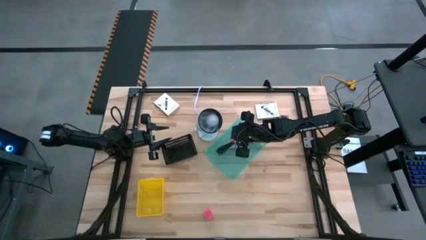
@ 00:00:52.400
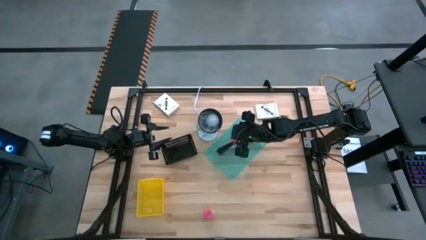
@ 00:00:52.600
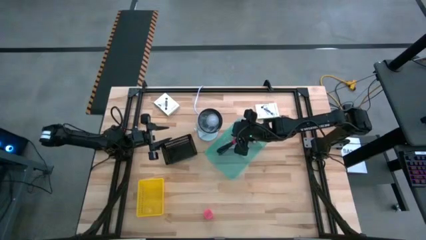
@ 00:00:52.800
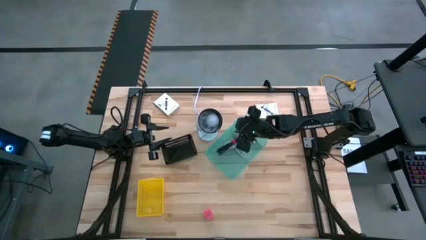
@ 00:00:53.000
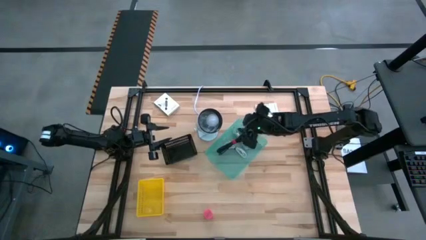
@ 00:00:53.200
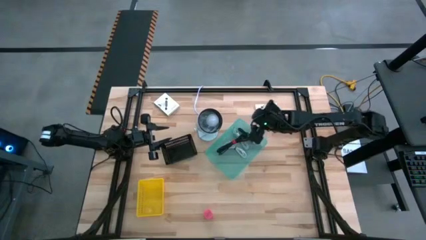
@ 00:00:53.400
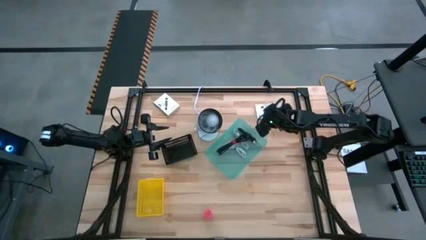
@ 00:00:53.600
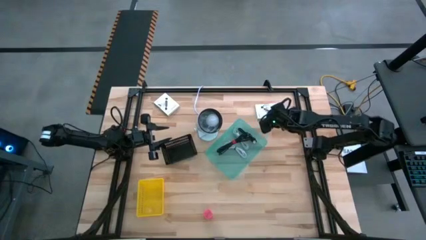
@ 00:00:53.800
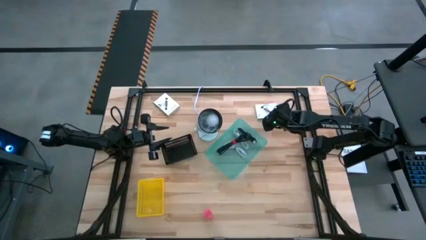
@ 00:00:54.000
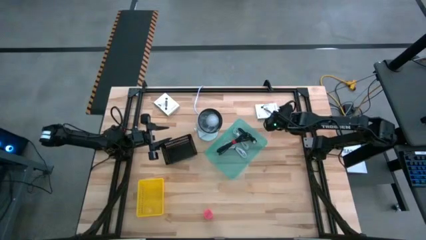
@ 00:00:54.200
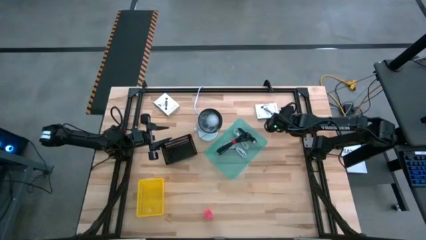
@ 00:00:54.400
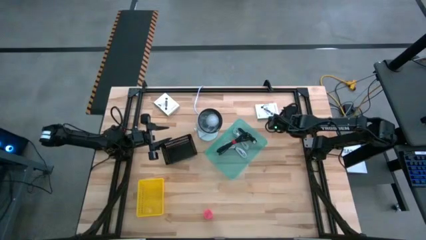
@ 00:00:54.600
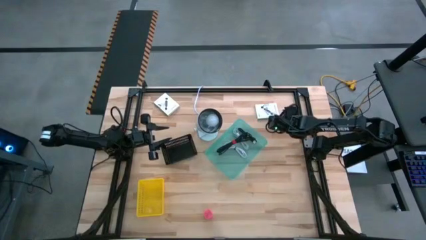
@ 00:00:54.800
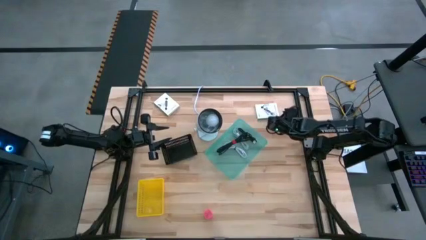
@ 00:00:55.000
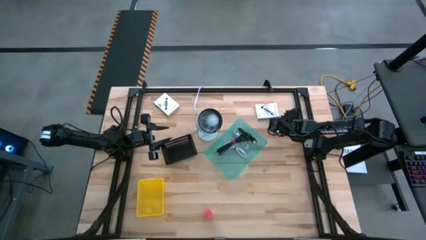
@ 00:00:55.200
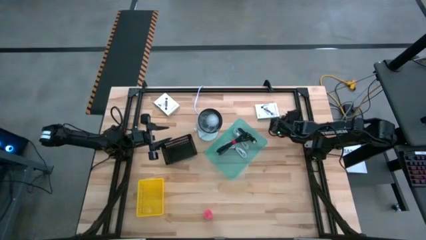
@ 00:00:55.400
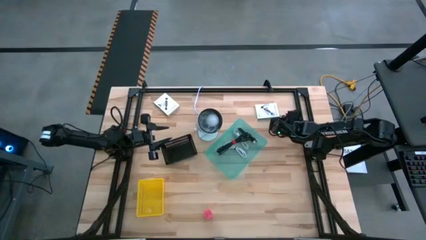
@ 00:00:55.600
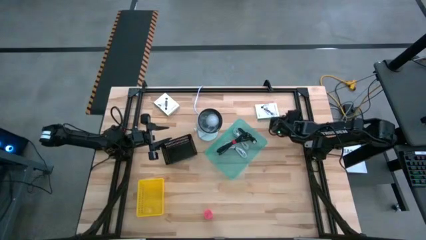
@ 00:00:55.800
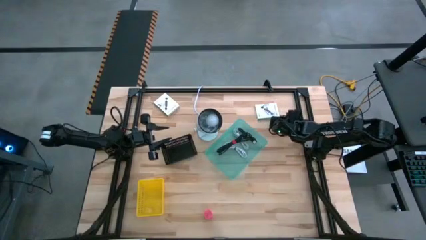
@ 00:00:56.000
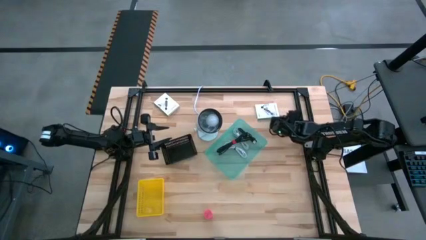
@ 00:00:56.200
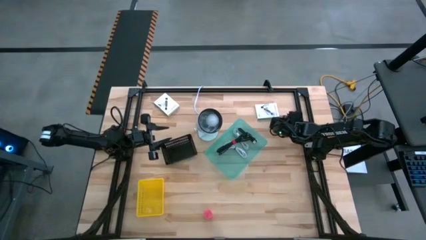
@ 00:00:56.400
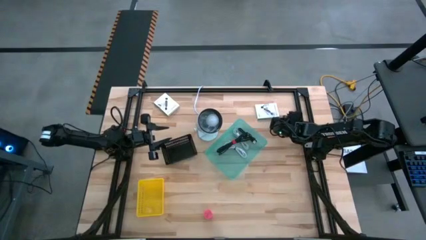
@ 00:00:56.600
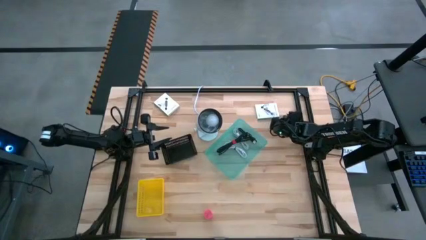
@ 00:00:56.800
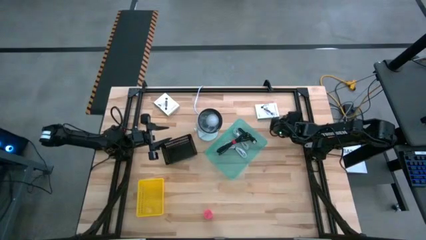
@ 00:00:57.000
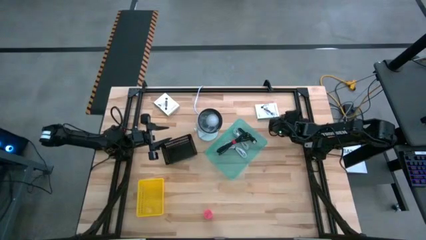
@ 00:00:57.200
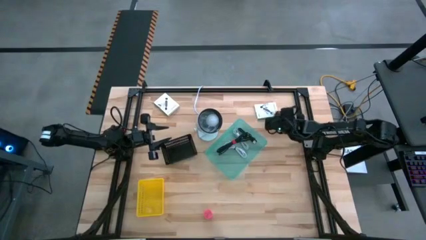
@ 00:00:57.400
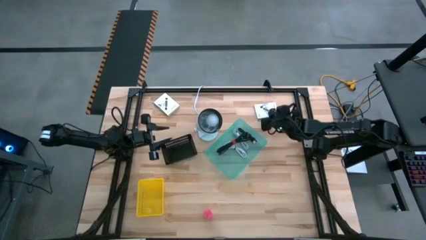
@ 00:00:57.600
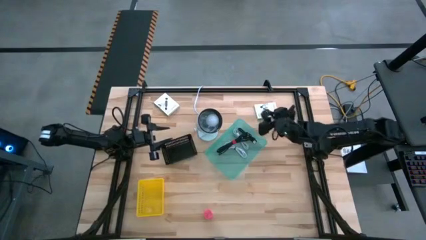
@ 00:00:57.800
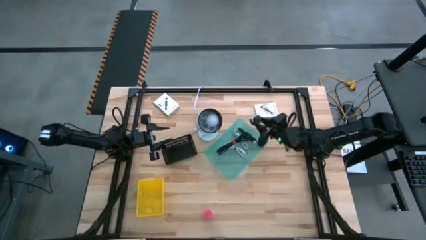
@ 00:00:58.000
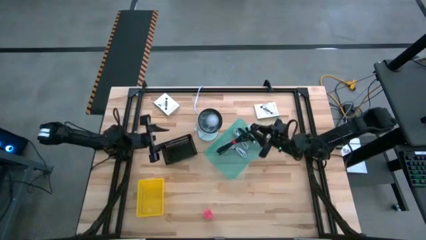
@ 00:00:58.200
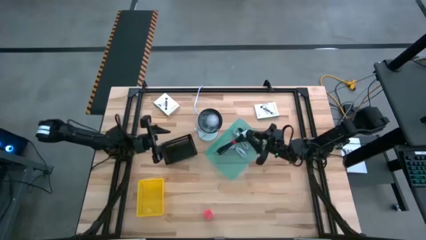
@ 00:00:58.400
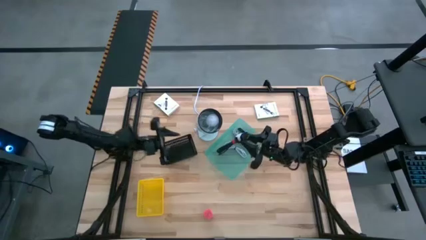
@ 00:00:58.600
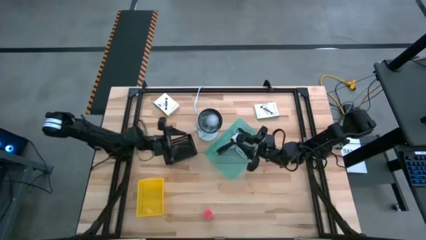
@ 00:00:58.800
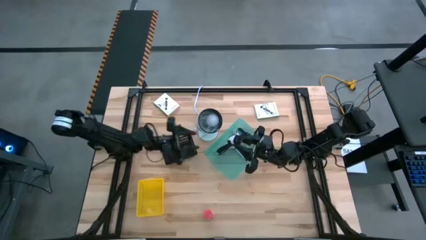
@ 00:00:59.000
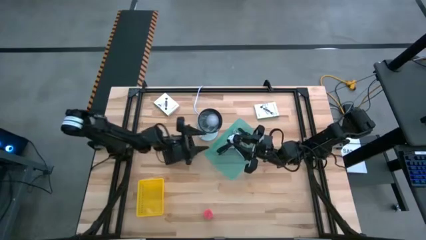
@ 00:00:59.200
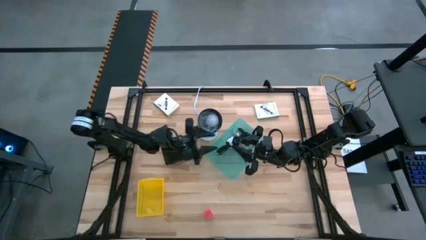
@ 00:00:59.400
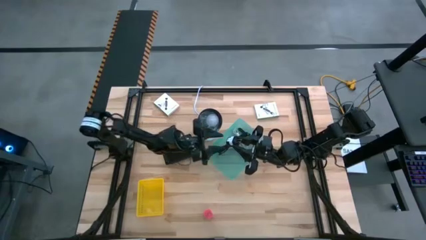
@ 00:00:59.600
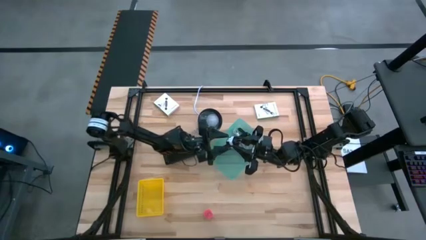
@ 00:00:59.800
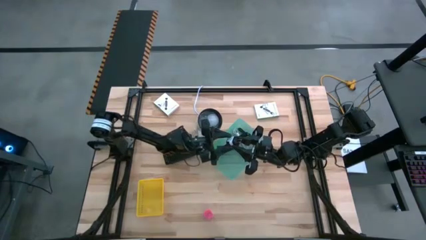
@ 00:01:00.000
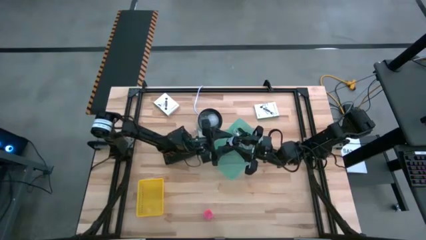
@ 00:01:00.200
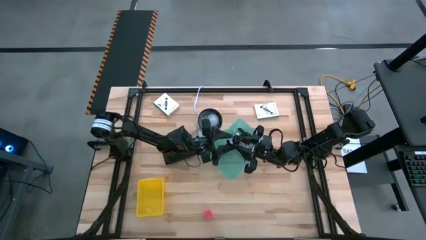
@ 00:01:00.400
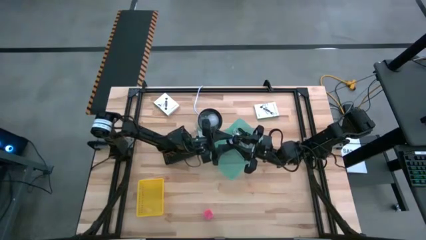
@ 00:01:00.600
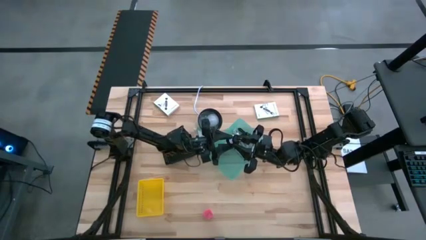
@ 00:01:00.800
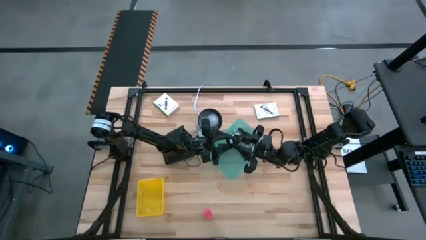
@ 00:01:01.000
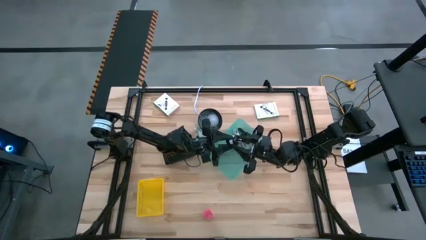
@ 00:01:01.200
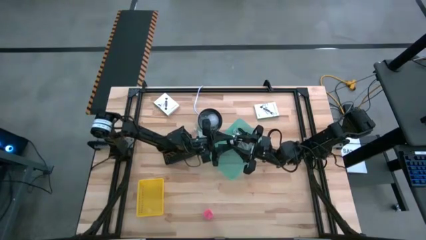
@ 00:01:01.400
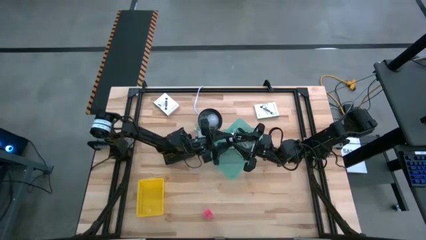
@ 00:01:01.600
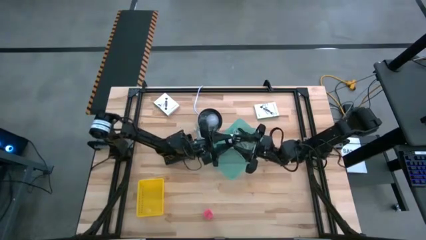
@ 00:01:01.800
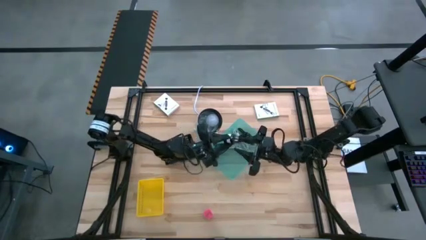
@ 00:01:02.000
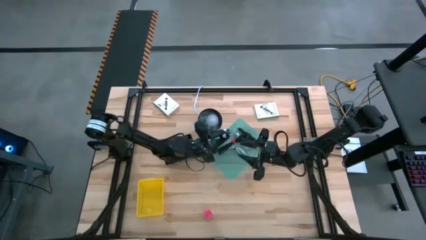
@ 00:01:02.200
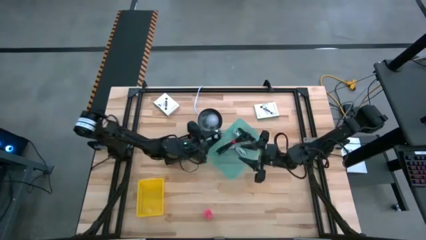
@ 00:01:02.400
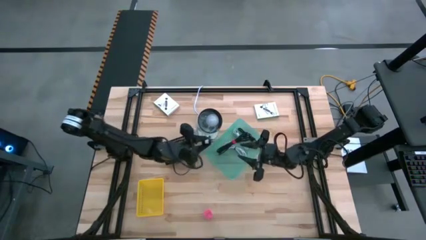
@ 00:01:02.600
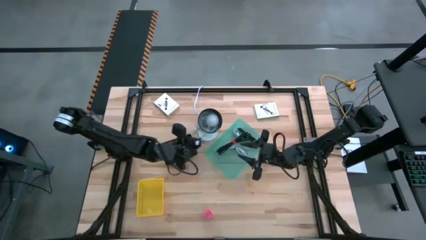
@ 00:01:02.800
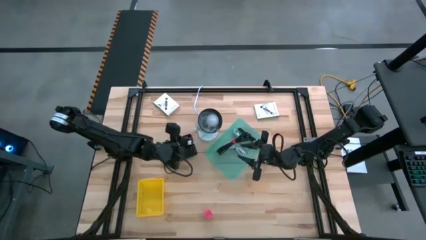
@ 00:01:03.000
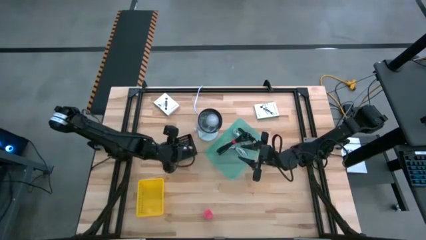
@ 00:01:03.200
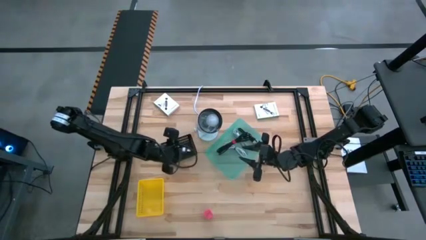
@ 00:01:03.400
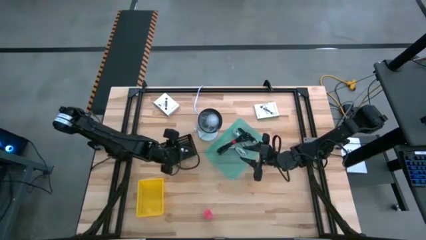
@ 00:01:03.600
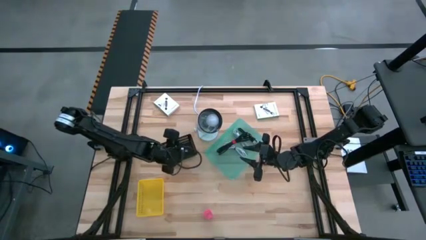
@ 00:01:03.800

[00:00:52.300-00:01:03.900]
Task: Pick and place items into bin
Put the black charger adapter into the black bin

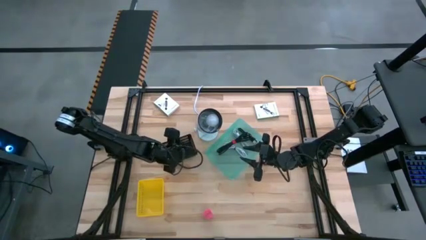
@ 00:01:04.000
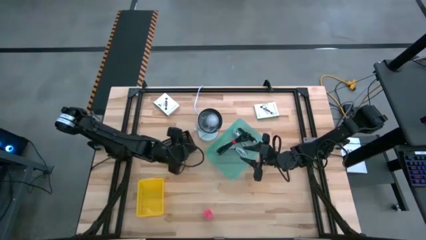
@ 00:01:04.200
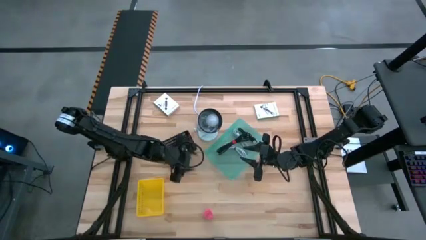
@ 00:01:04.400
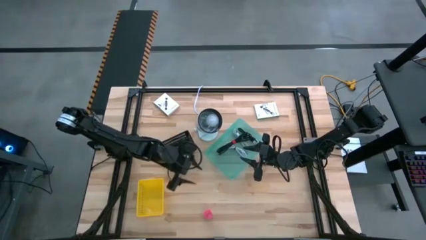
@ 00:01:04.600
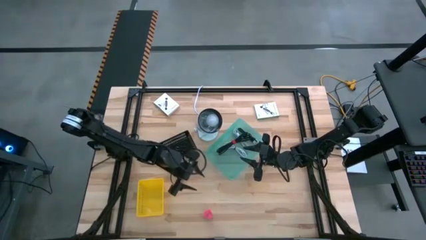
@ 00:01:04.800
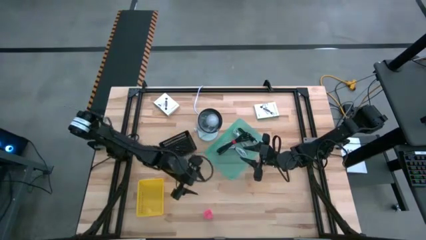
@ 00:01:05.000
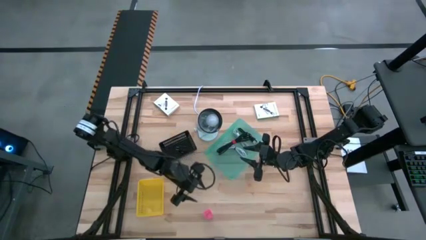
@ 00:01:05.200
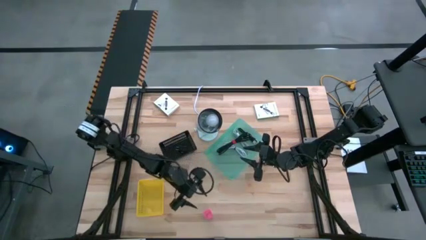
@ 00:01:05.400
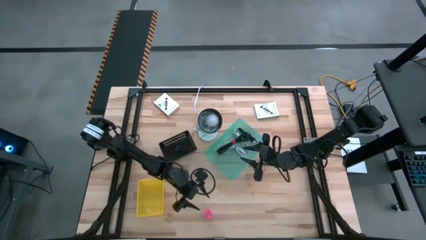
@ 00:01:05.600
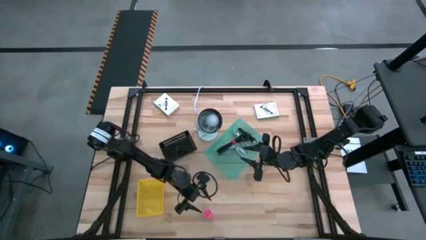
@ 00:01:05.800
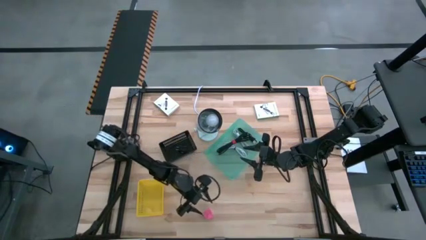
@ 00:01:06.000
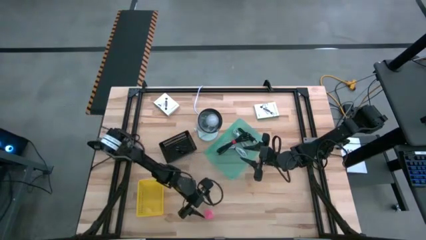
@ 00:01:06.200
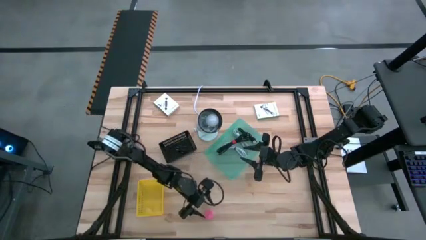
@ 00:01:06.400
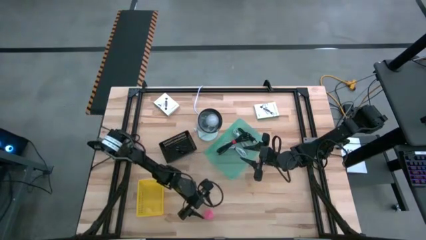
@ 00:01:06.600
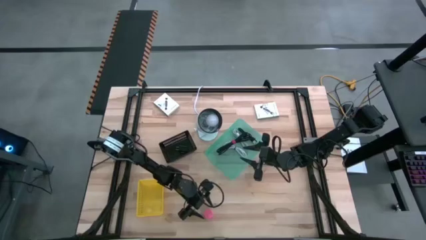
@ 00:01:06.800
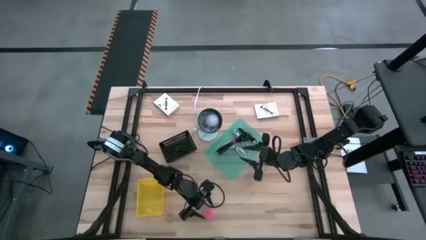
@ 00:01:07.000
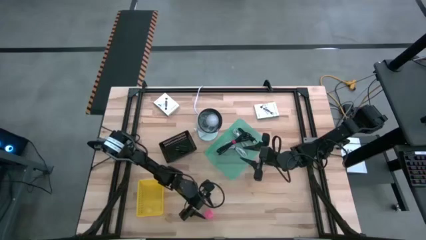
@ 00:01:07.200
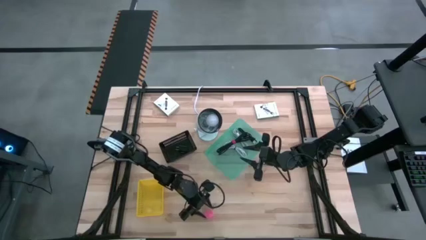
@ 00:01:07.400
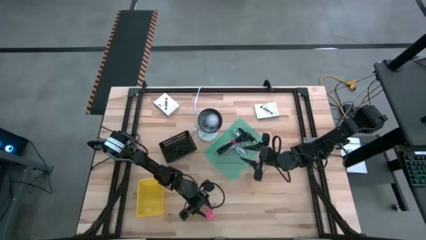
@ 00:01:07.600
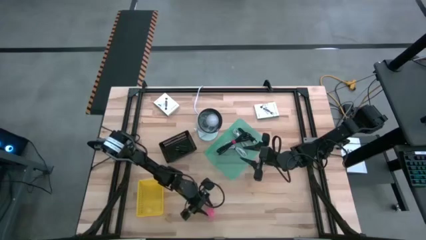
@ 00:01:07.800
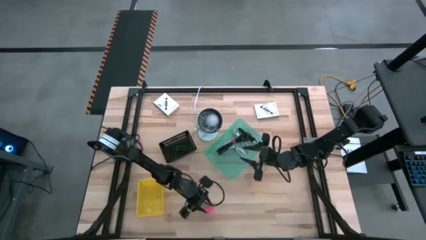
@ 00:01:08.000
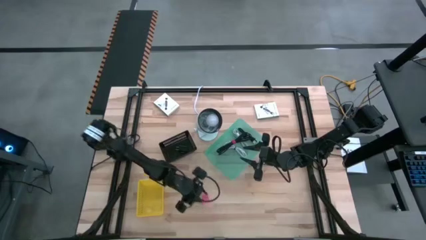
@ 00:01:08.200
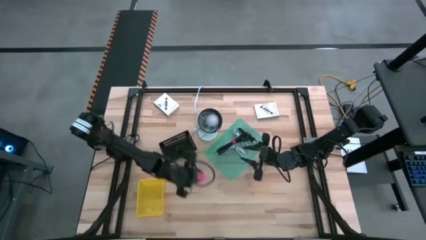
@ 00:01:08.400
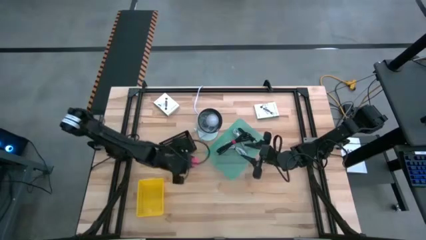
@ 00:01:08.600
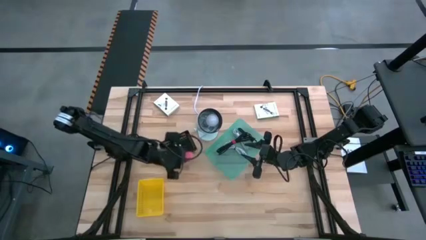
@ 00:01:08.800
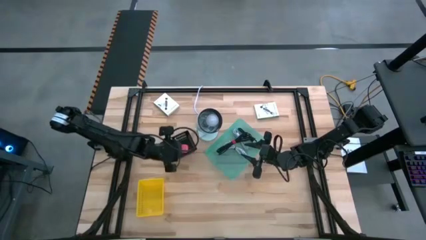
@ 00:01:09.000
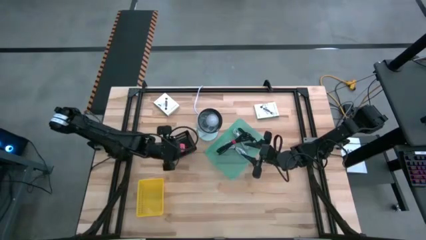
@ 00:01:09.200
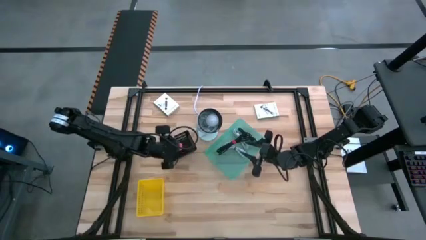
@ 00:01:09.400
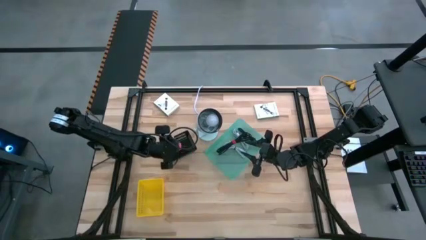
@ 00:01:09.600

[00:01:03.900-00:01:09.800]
Put the pink charger adapter into the black bin
